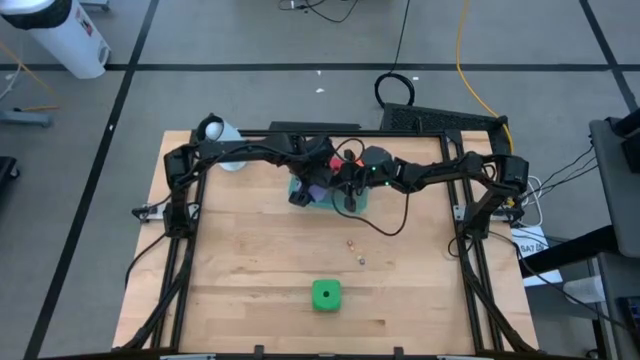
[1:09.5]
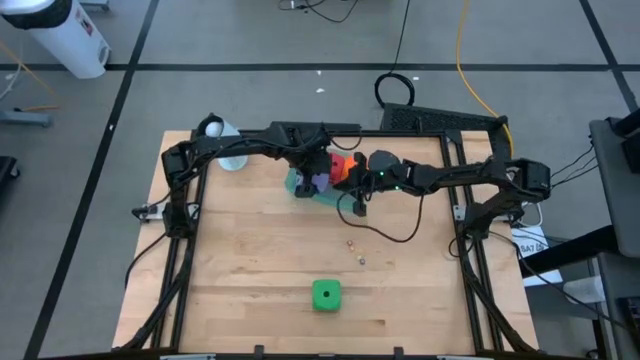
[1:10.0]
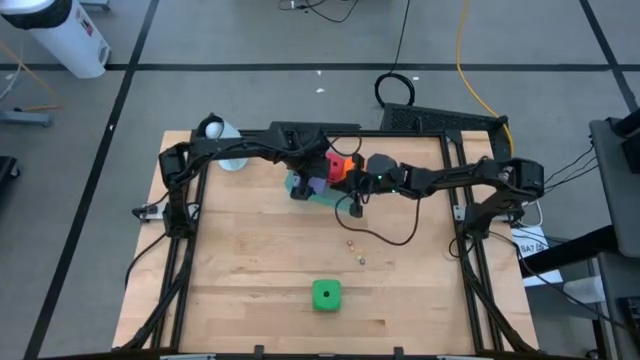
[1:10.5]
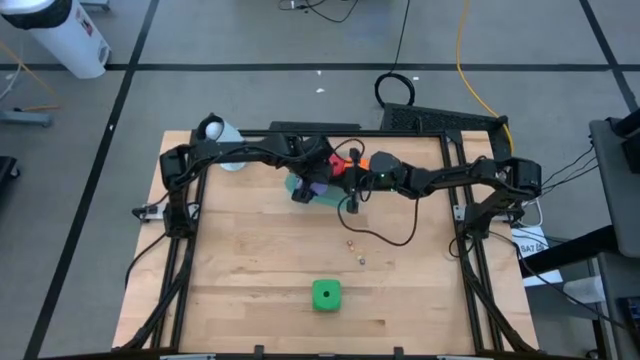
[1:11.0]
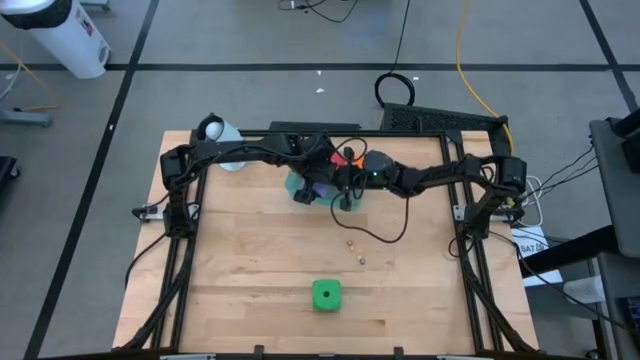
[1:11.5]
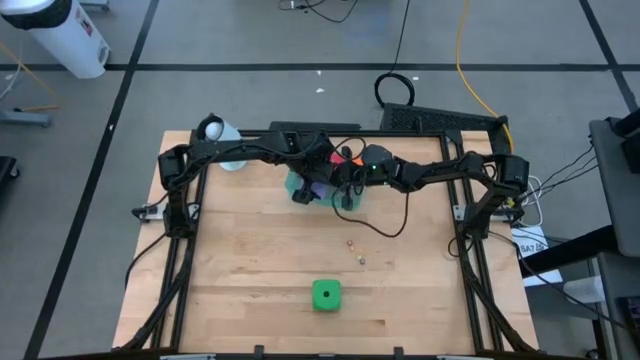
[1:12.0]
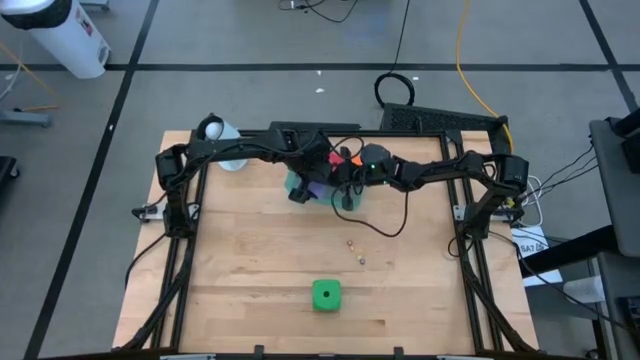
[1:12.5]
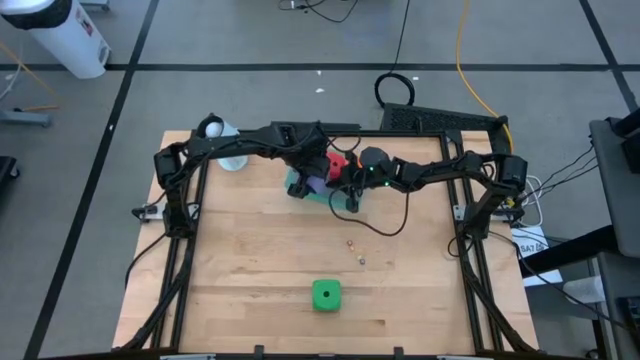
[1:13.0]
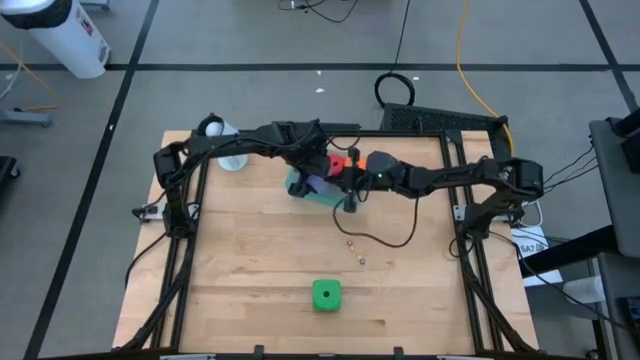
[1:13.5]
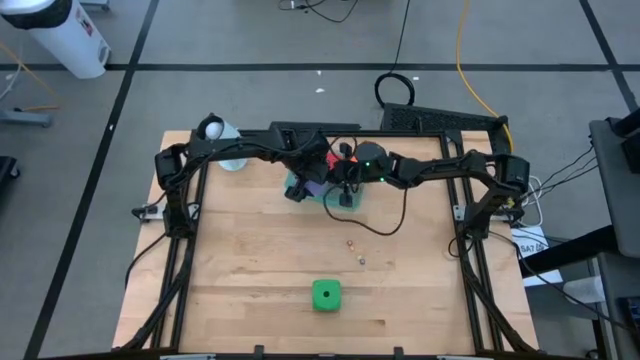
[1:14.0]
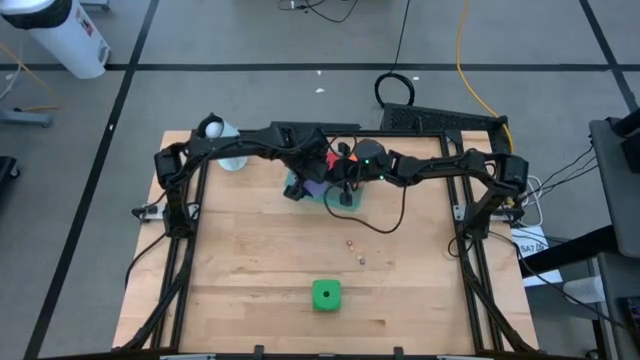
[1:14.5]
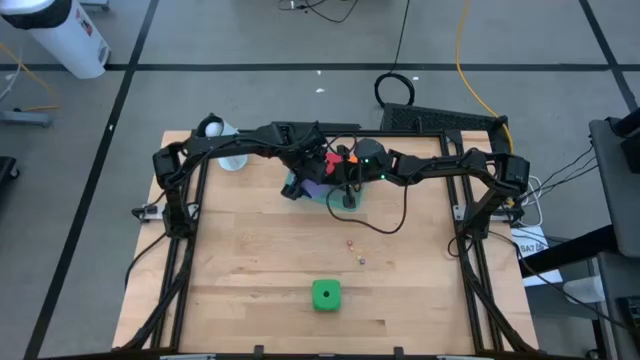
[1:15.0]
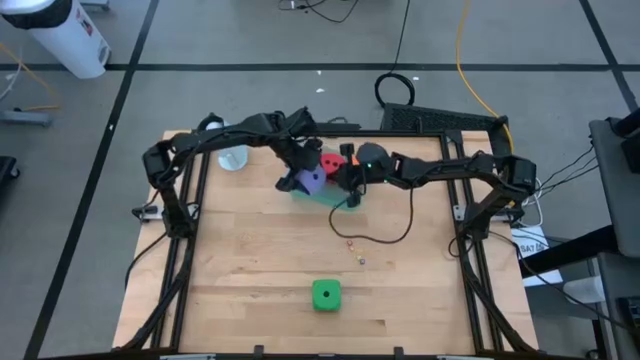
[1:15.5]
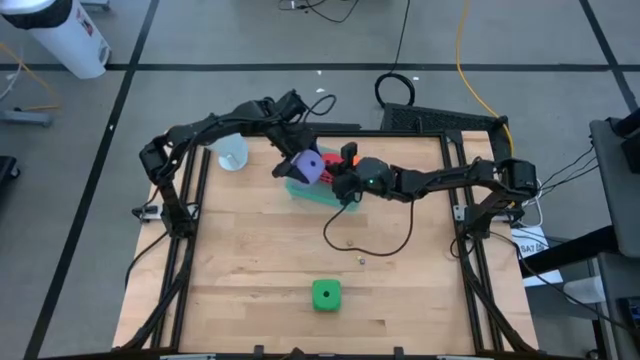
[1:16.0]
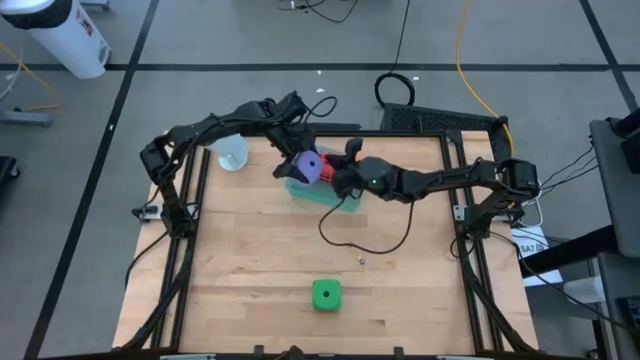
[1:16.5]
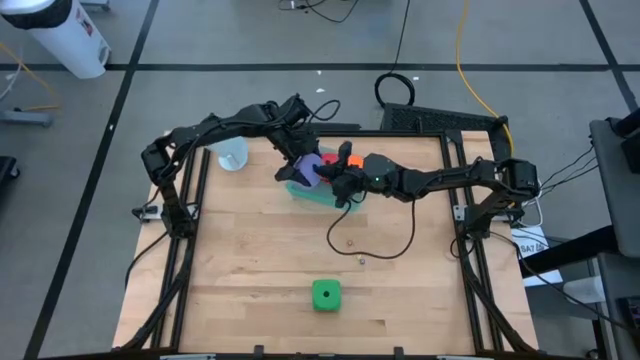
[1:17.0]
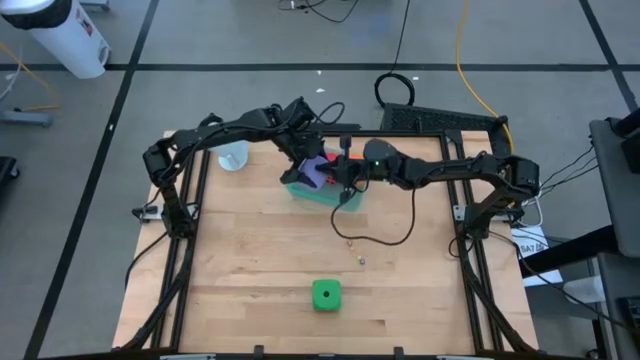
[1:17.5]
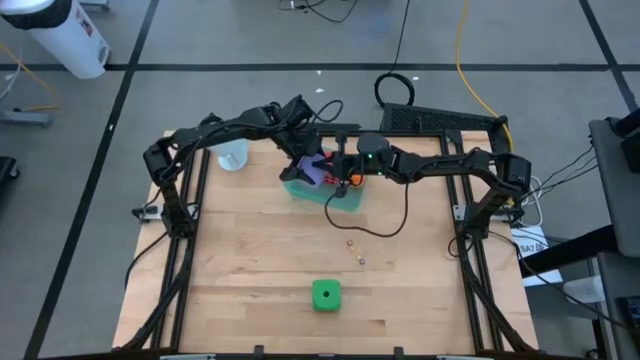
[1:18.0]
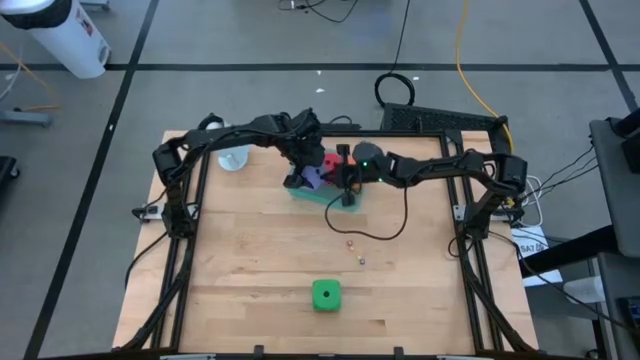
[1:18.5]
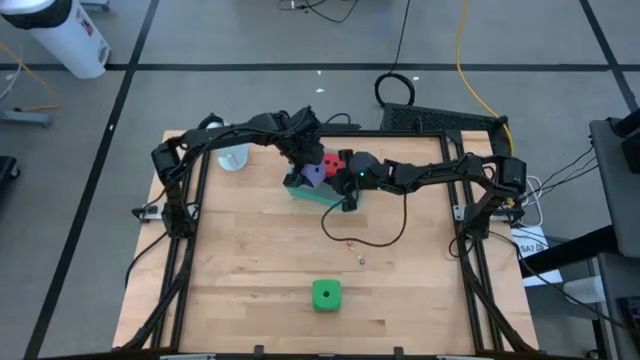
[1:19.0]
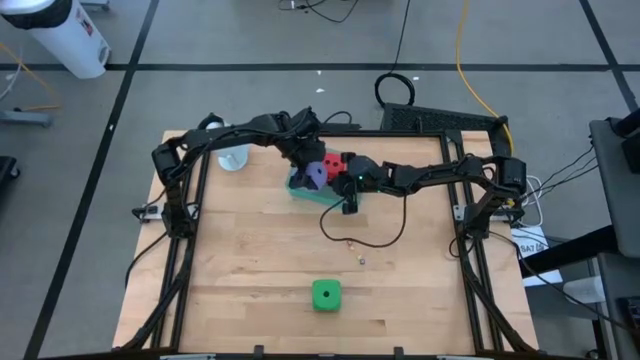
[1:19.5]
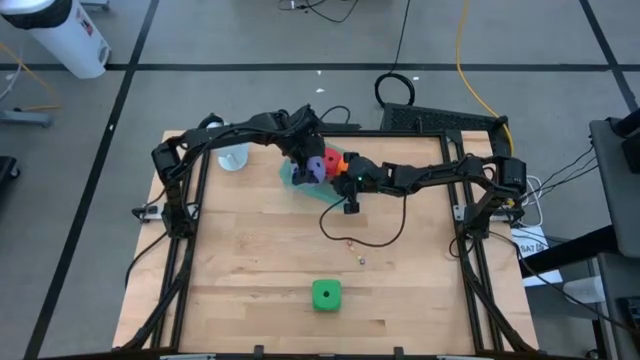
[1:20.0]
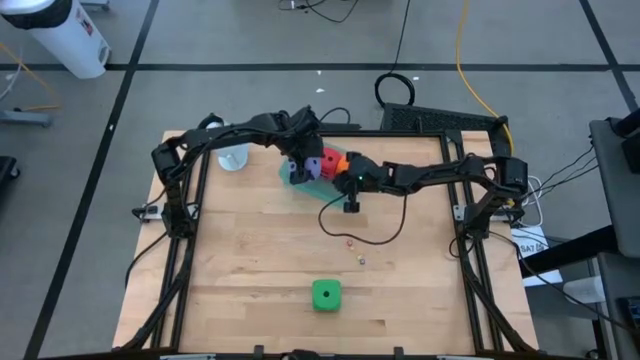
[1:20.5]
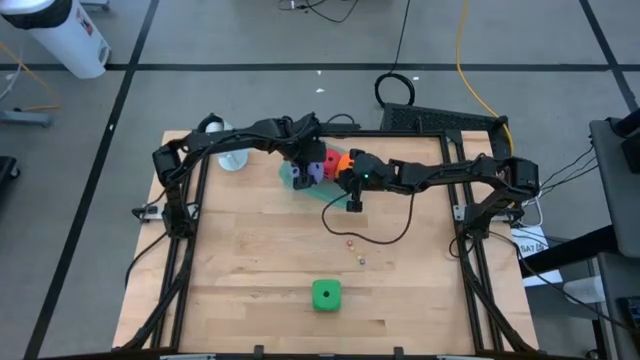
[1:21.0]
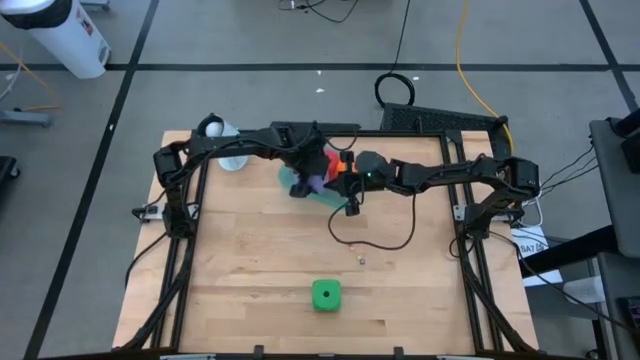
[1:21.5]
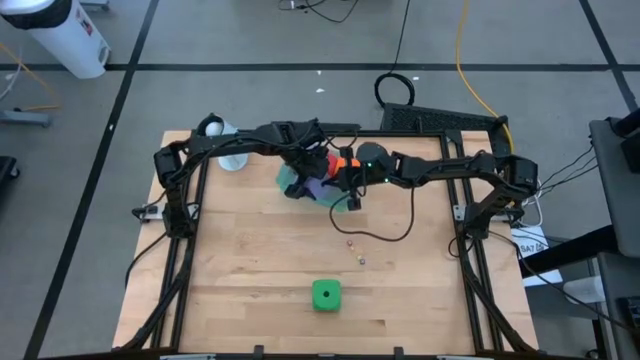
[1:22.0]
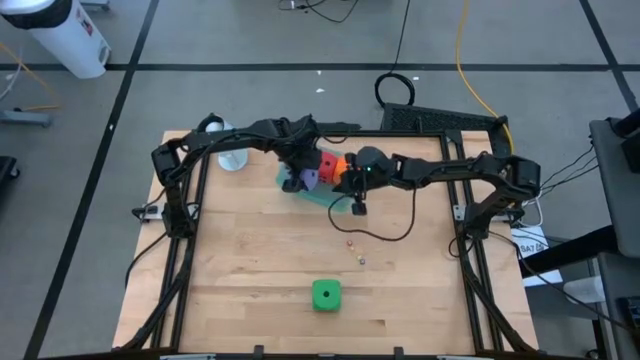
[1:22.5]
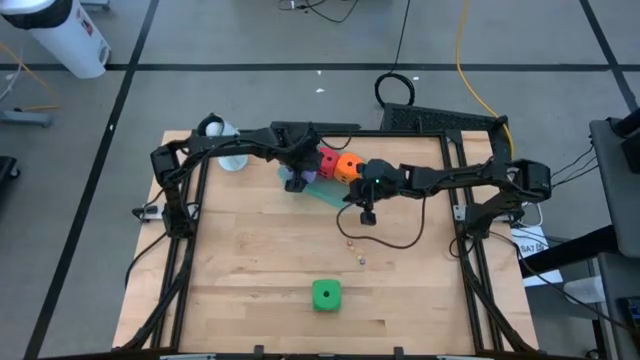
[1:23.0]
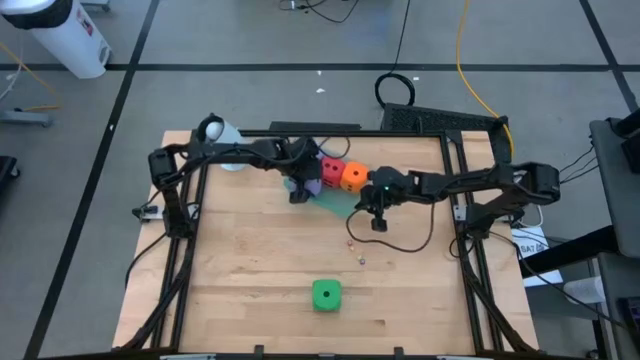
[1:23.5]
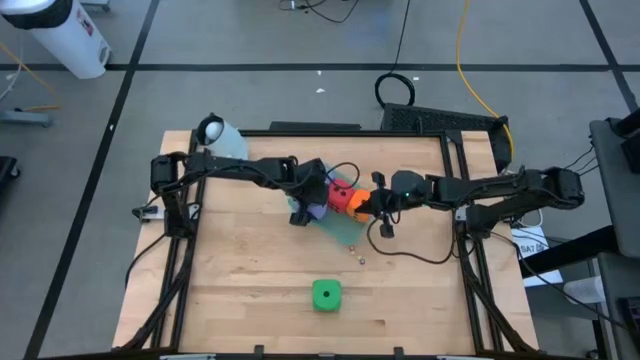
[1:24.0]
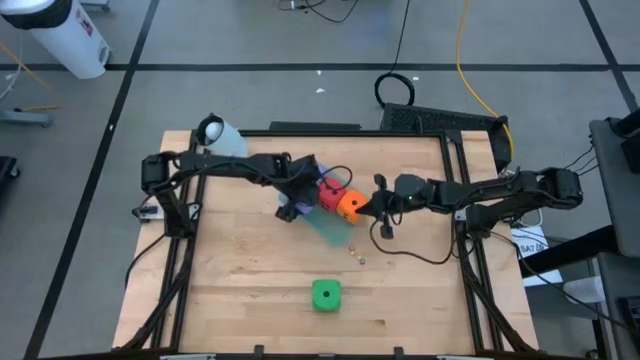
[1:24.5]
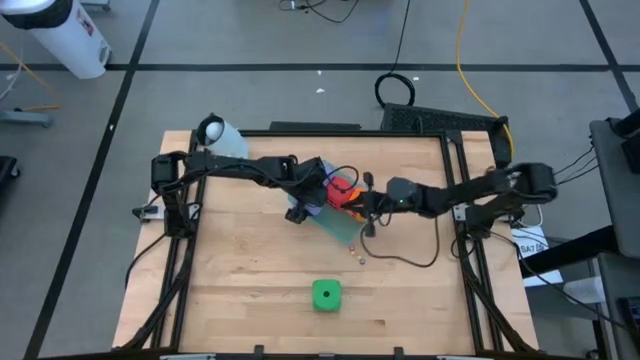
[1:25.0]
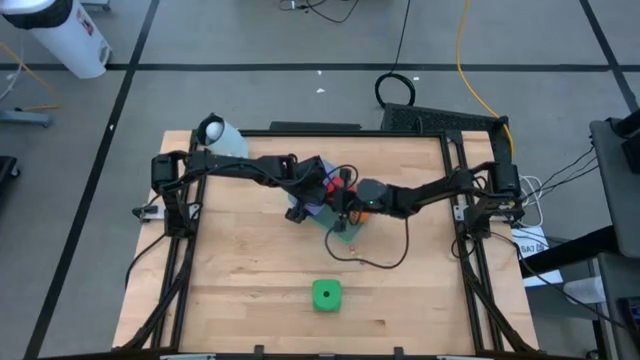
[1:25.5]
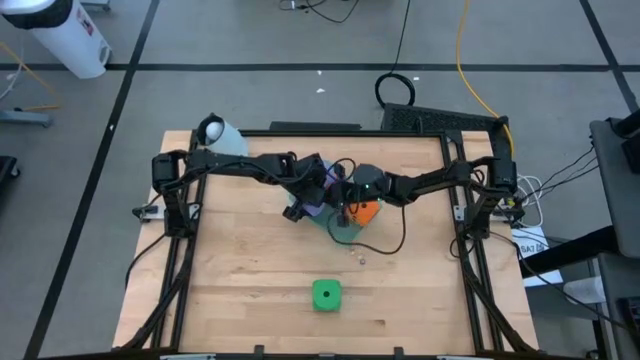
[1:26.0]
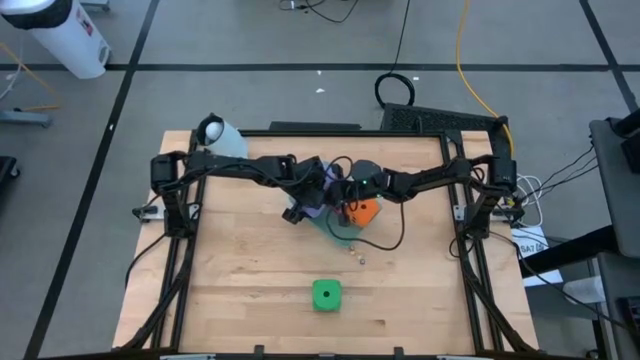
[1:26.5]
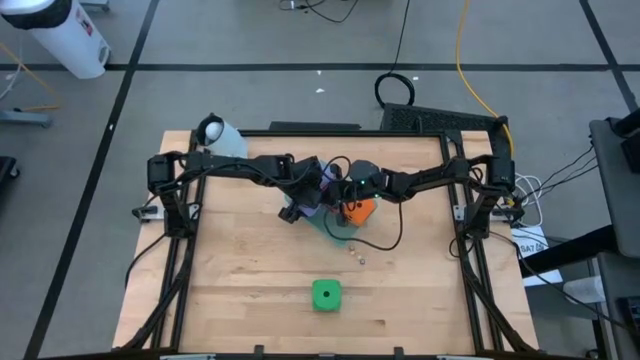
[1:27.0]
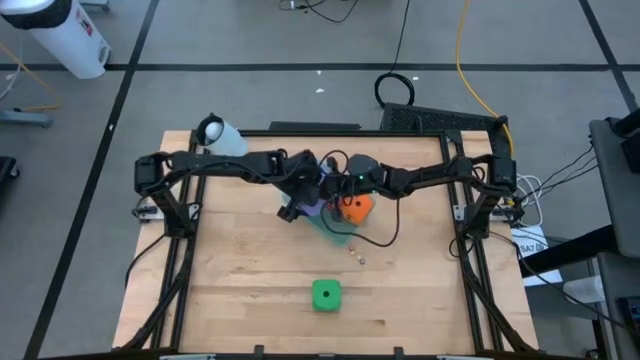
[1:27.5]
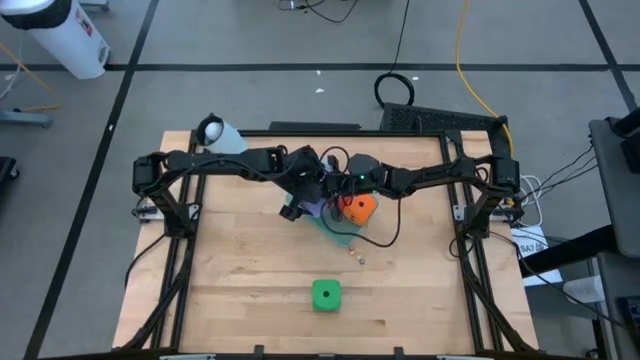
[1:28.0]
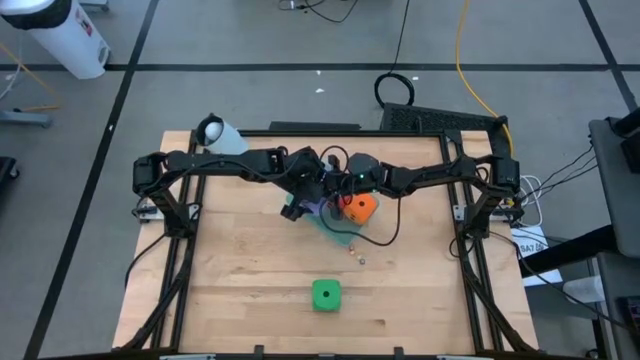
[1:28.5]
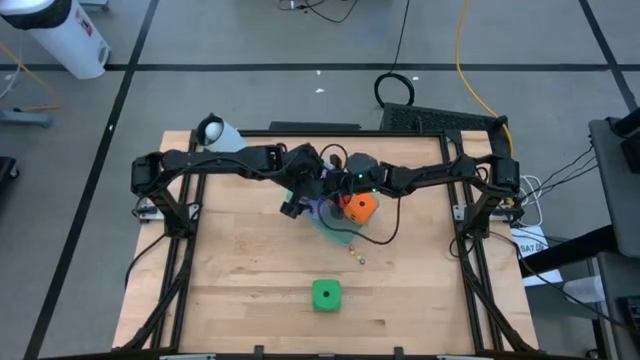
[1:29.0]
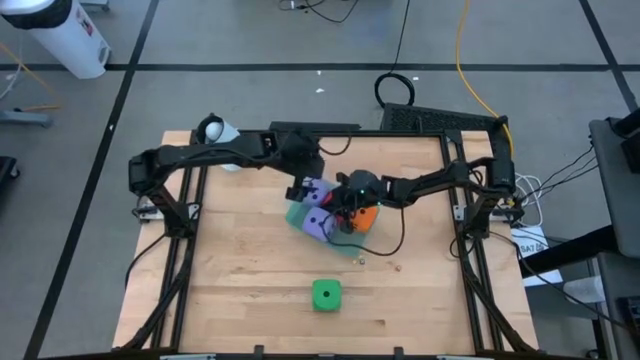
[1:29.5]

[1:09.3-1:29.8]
Task: Pick & Place Dice
Put the large purple die into the green bin

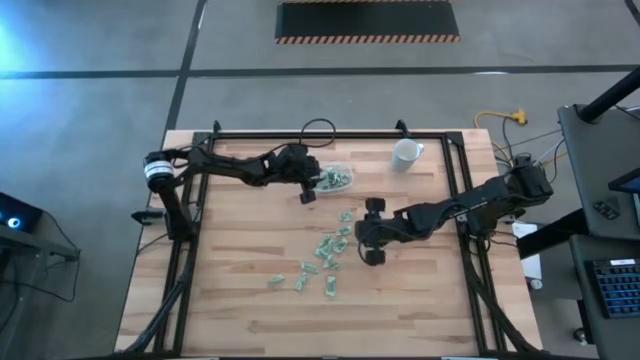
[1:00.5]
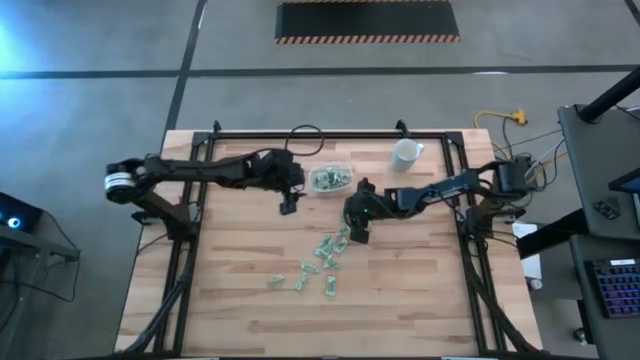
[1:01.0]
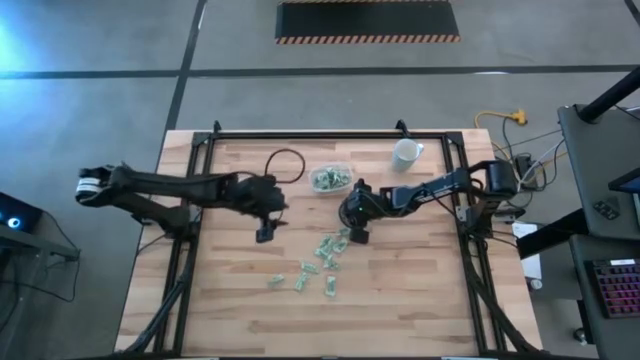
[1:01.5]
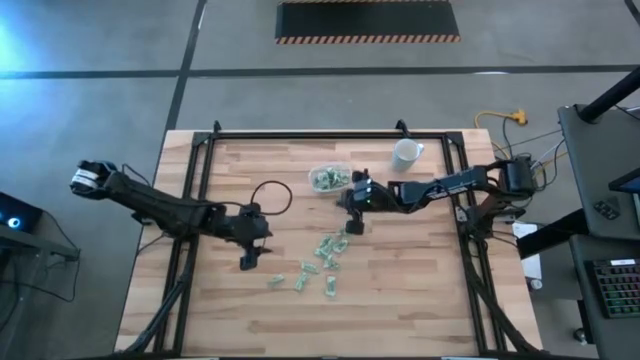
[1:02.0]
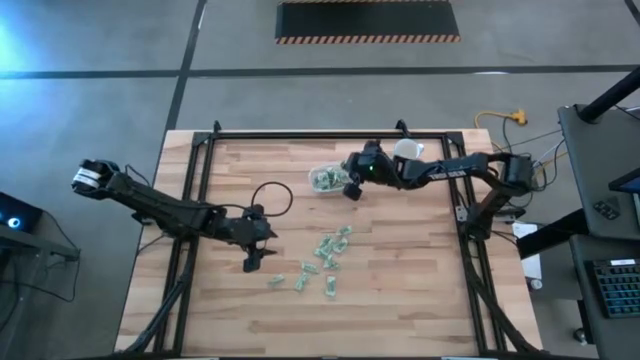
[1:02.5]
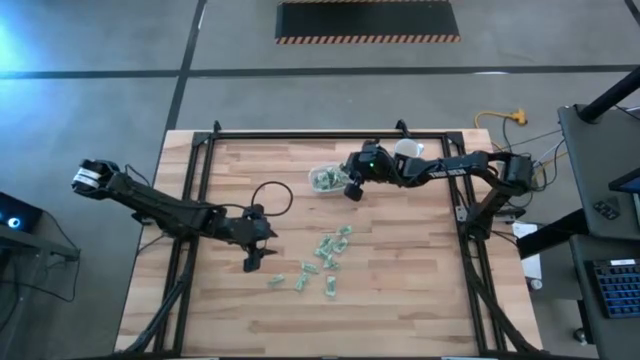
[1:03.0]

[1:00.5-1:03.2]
Task: Pick and place Stevia / Truvia into bins
Put the stevia packet into the transparent container
